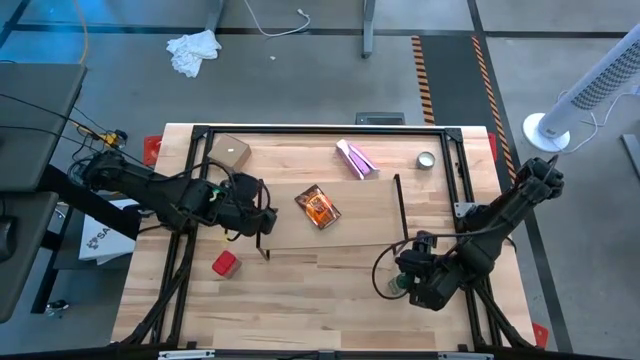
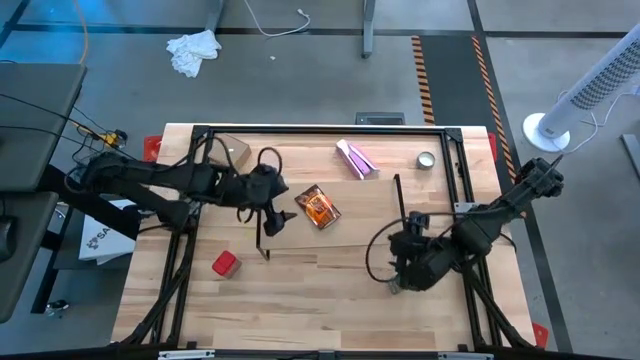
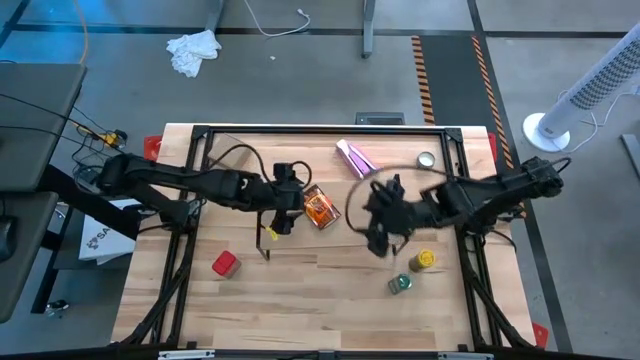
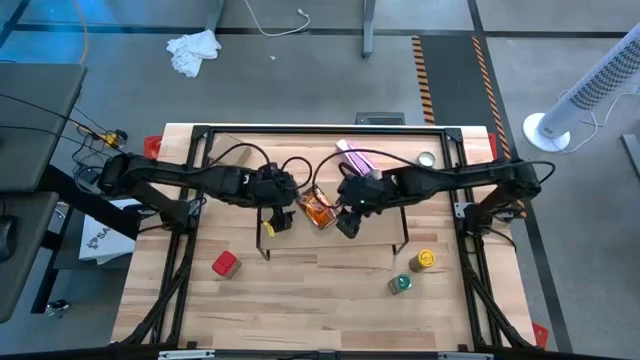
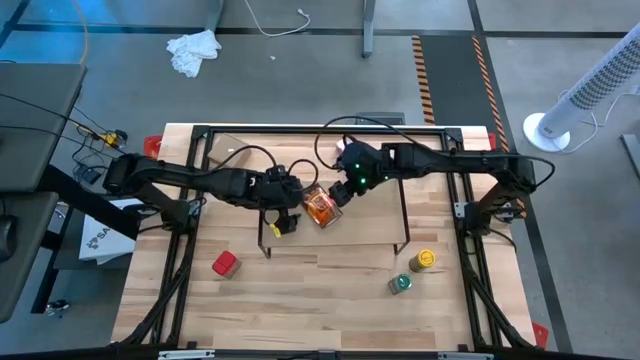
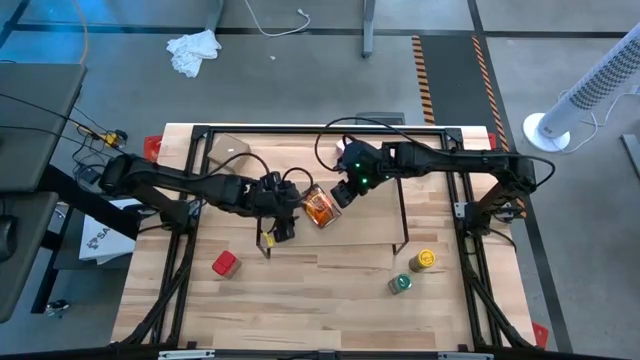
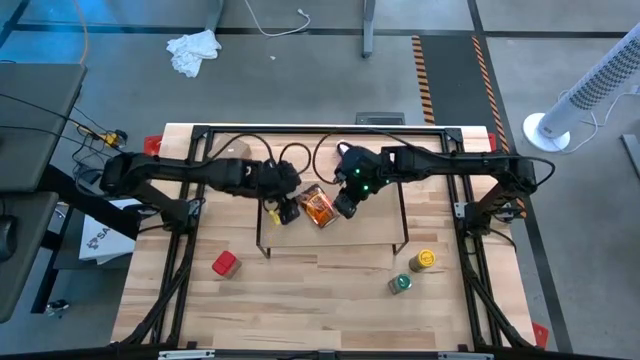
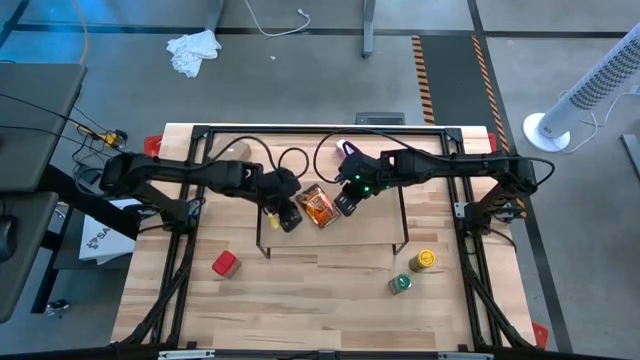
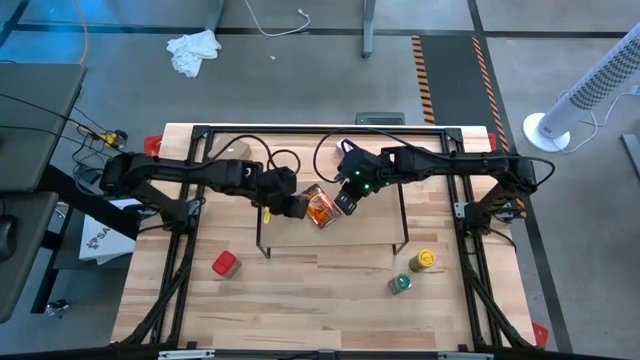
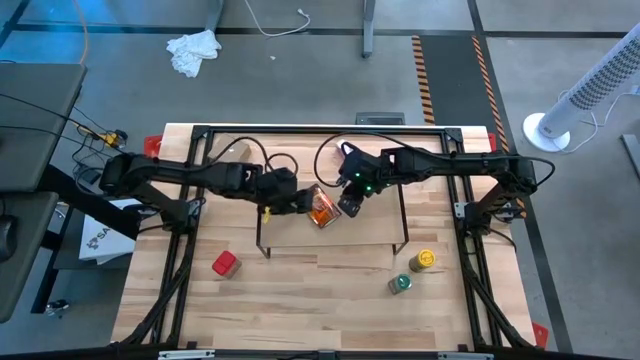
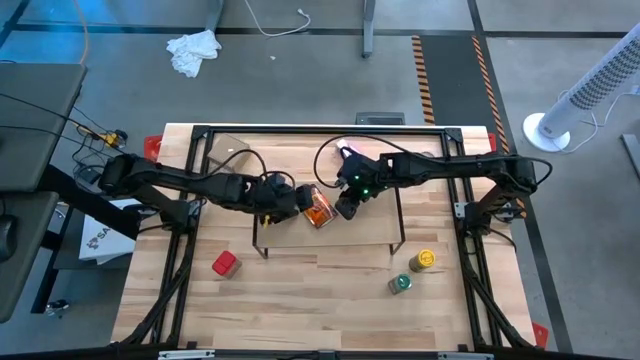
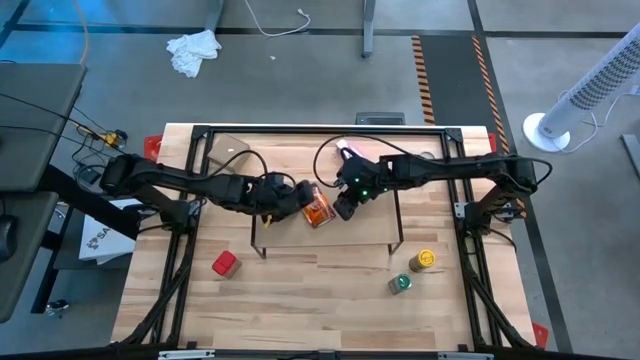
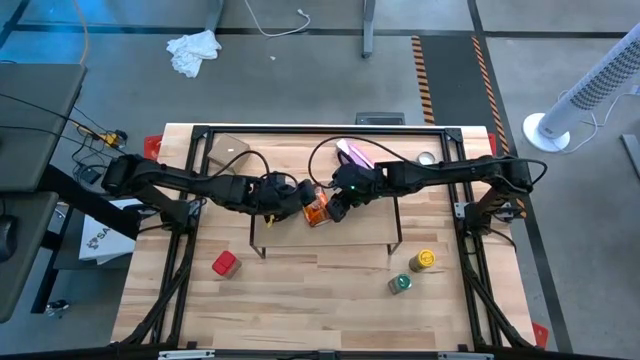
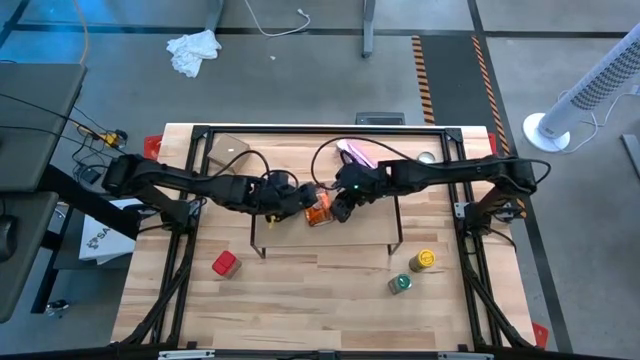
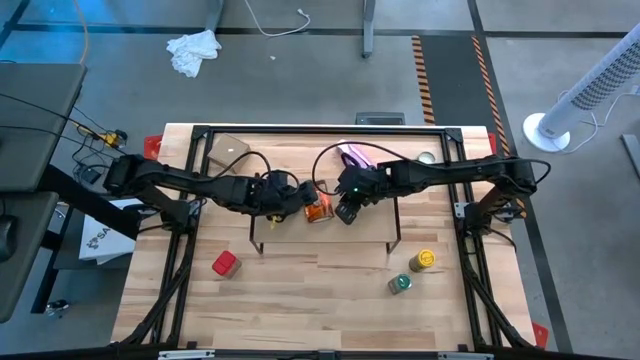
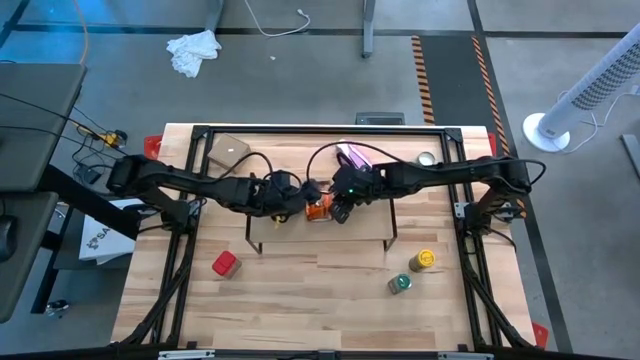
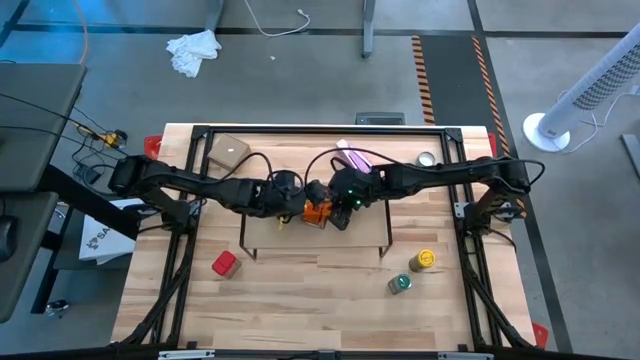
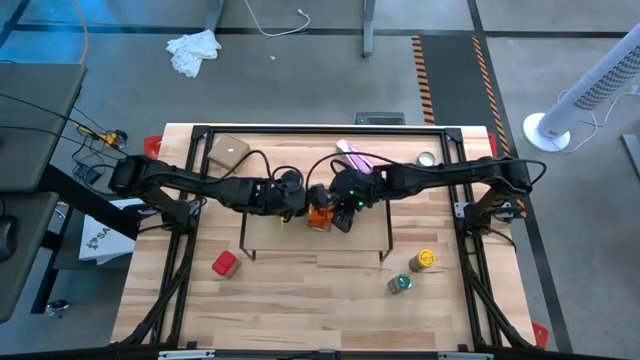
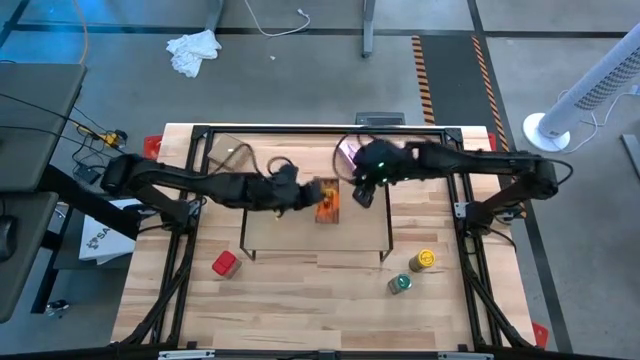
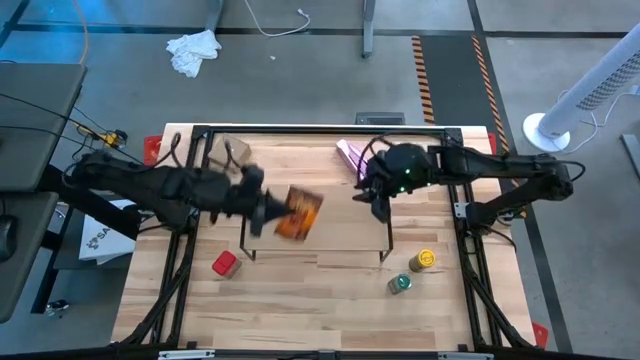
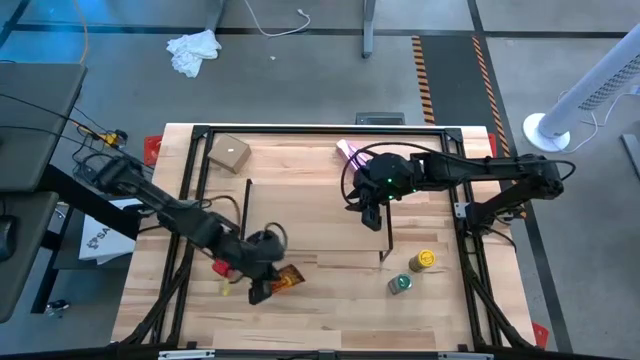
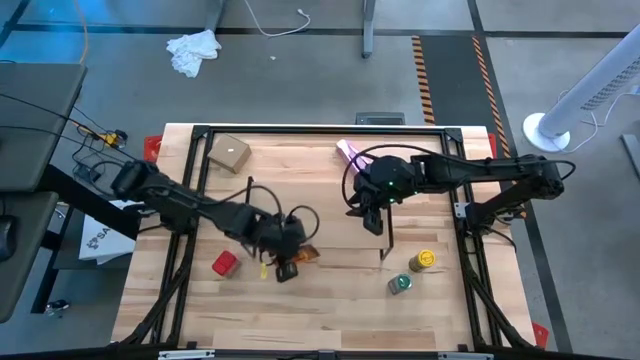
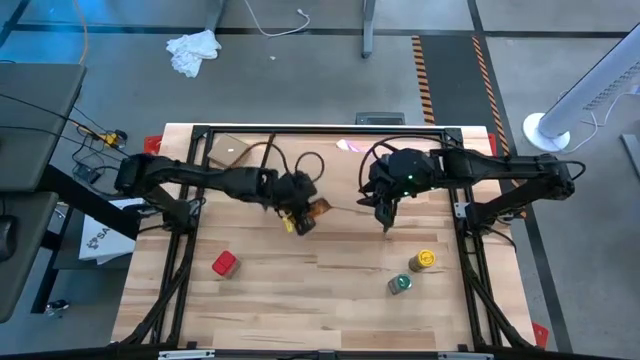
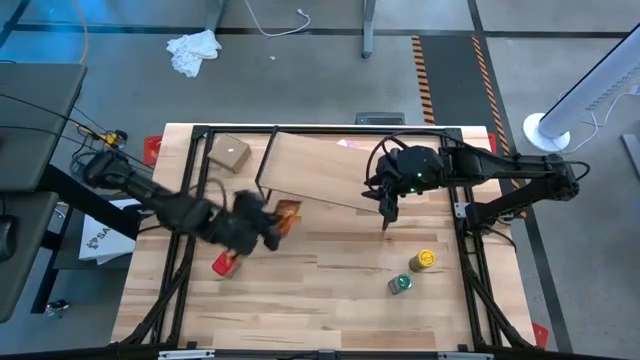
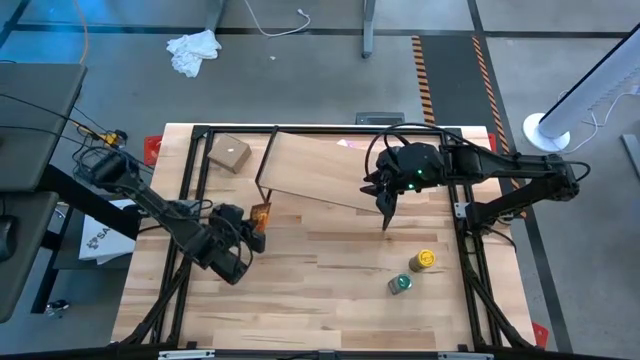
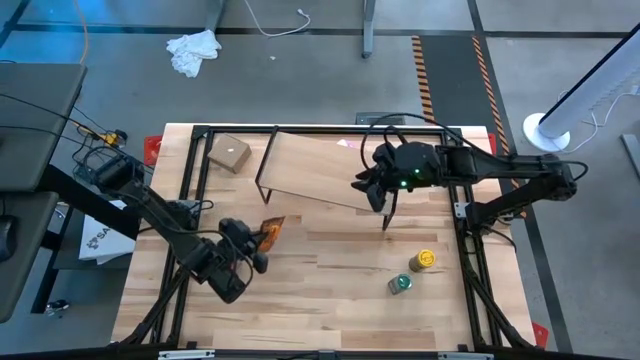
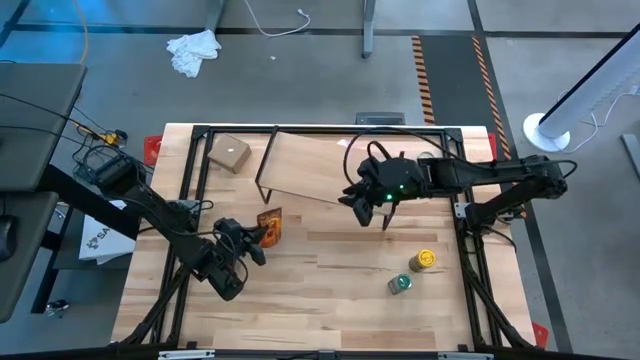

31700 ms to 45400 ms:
Task: Shelf spices
Remove the orange seasoning can from the shelf

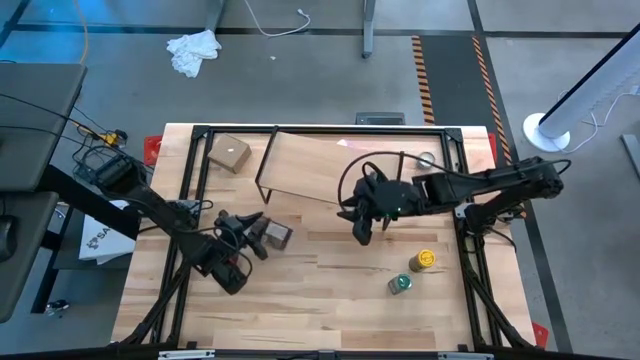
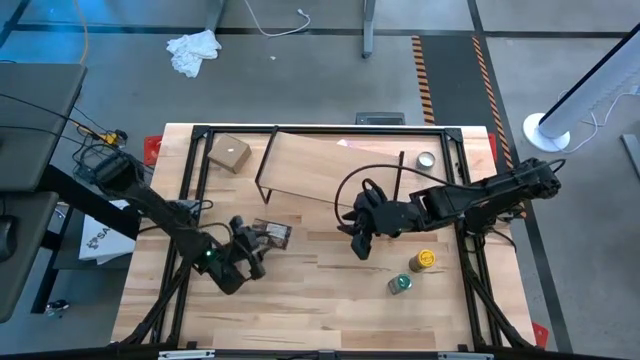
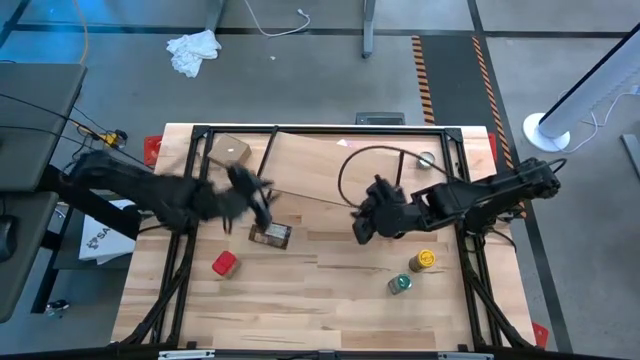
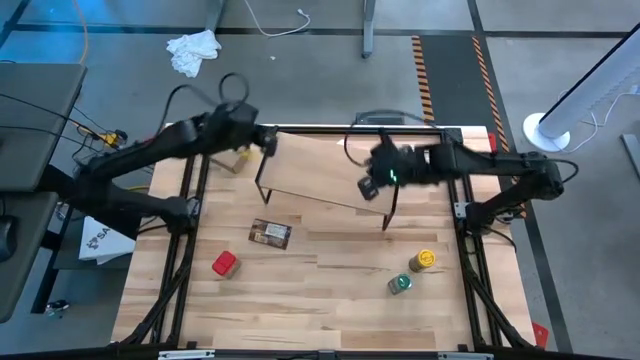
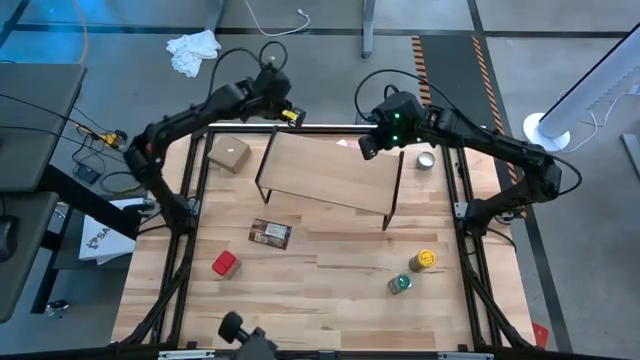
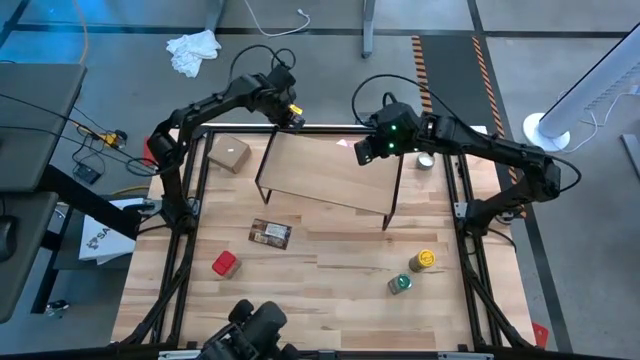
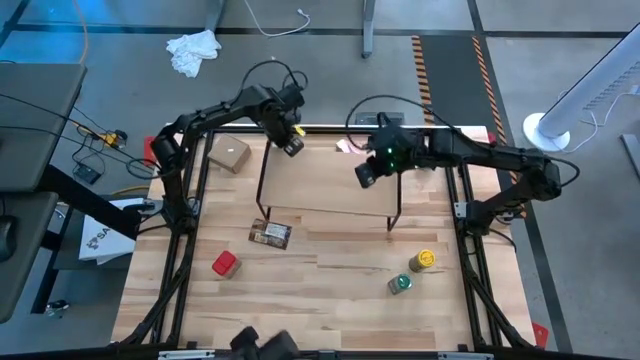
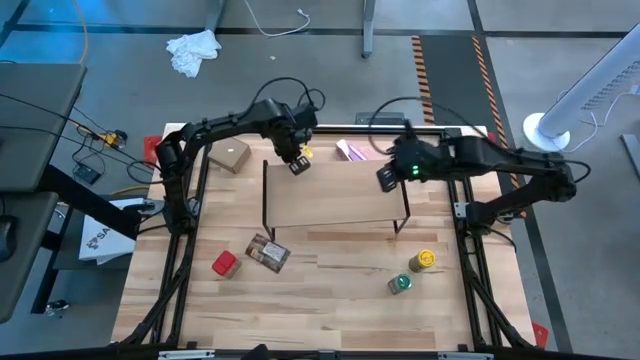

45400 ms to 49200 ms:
Adjust the shelf on the center of table

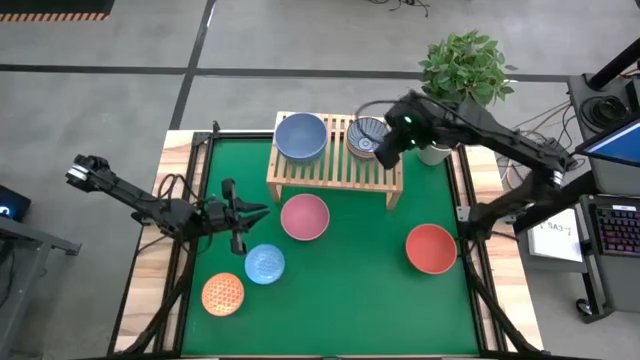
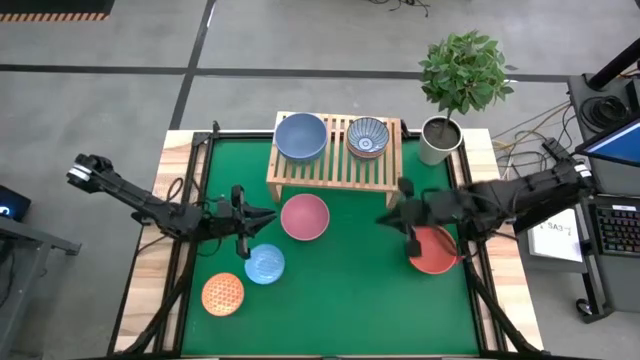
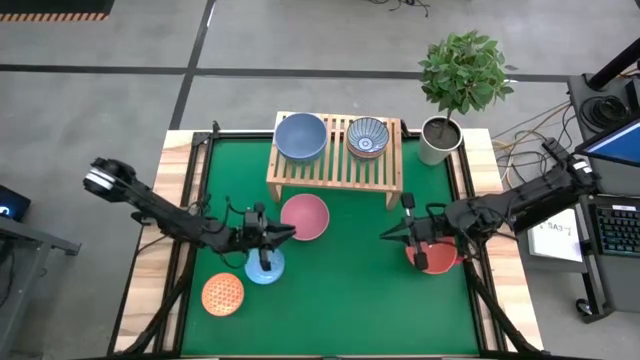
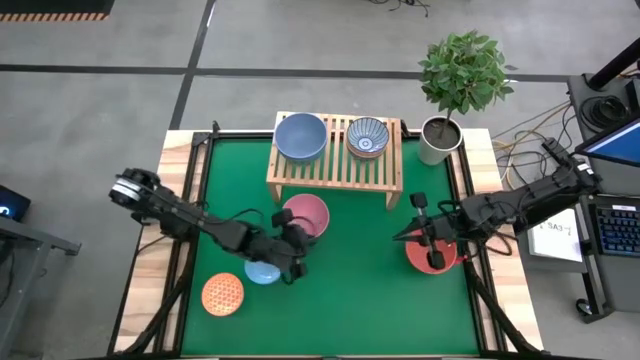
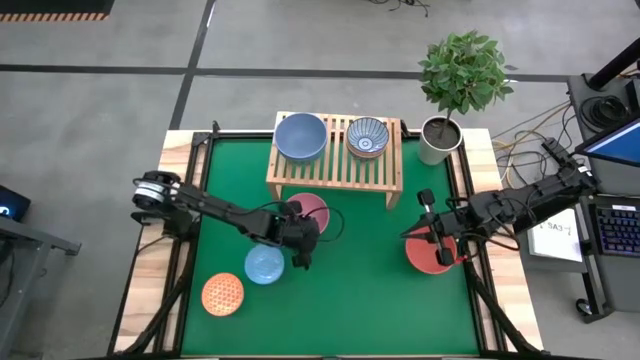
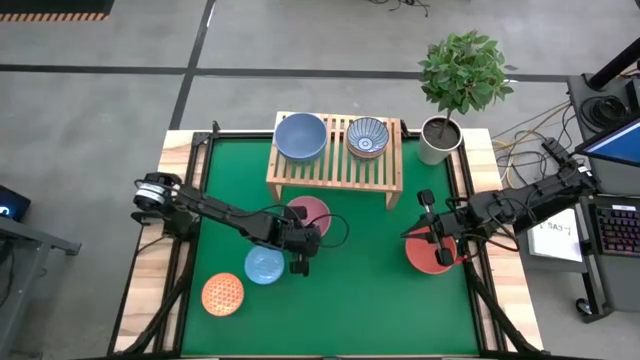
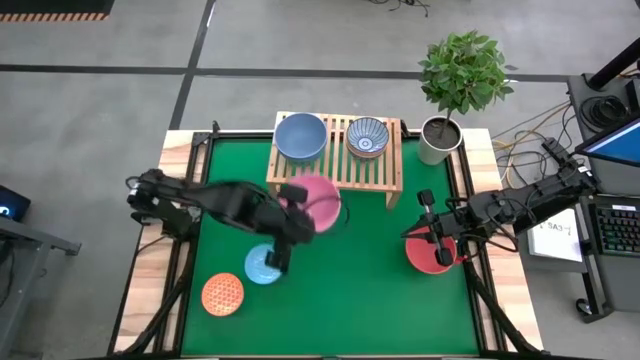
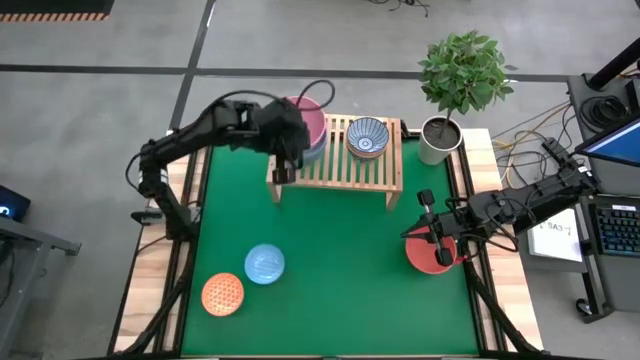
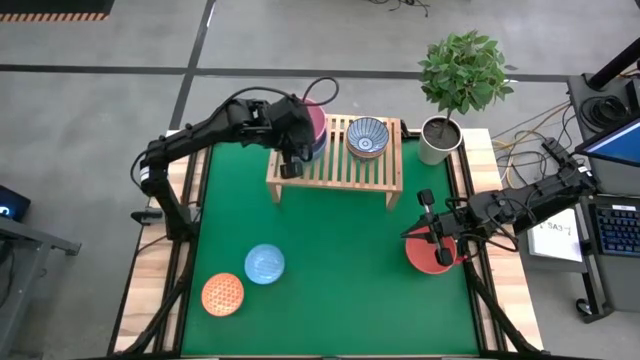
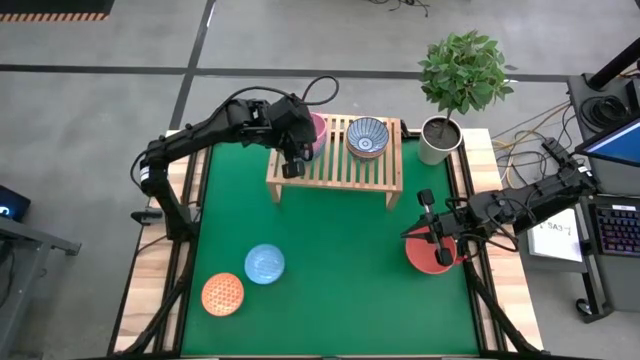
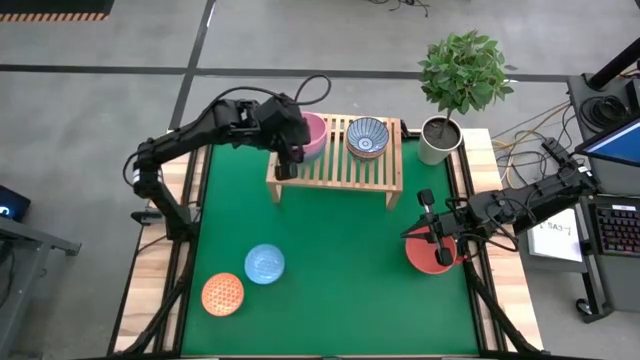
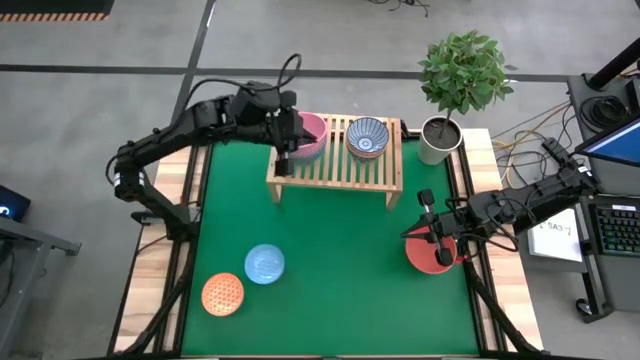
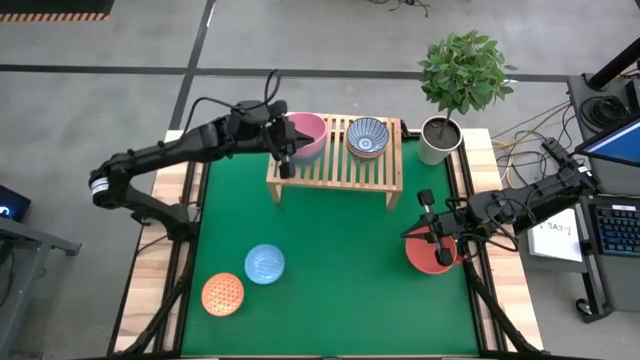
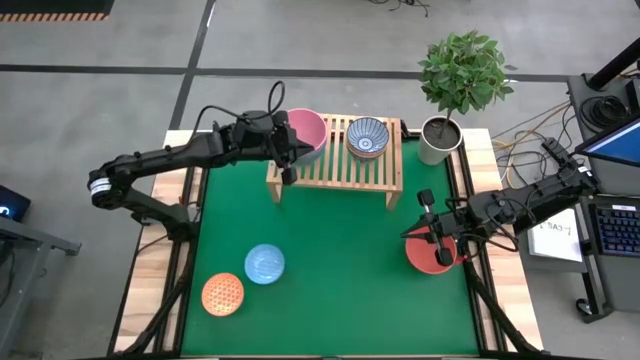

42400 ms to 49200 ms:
Task: Place and stack bowls onto a shelf
Stack the pink bowl on top of the light blue bowl on the shelf
